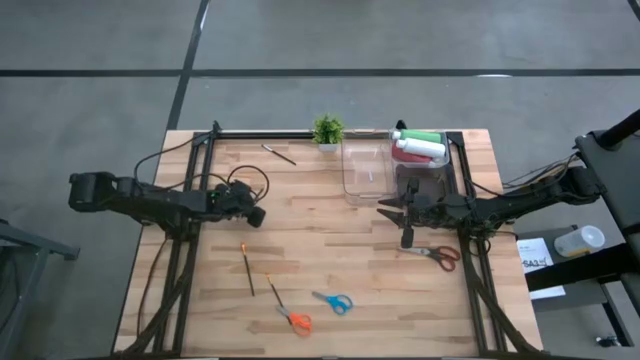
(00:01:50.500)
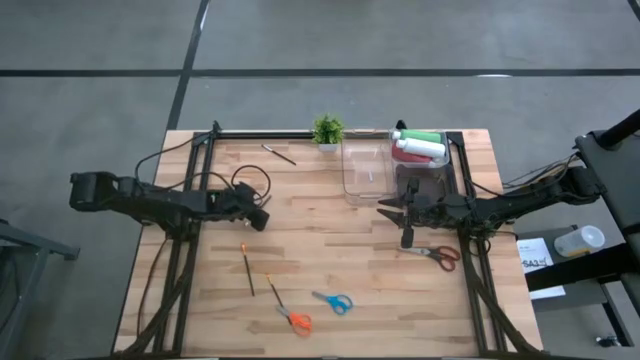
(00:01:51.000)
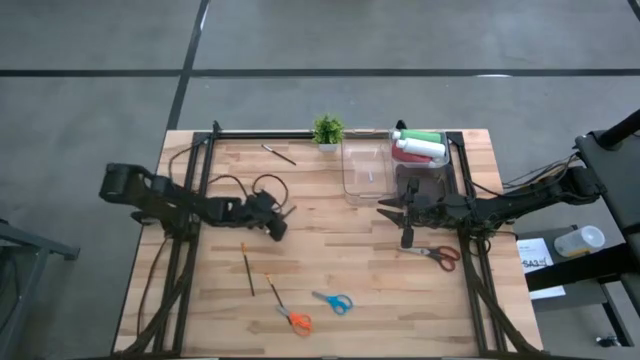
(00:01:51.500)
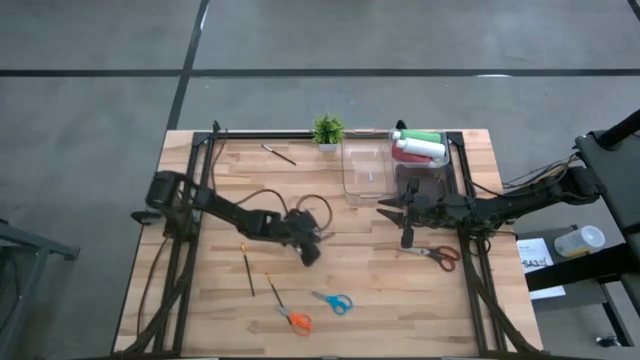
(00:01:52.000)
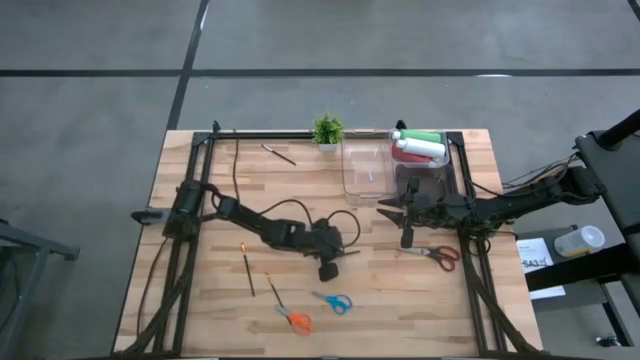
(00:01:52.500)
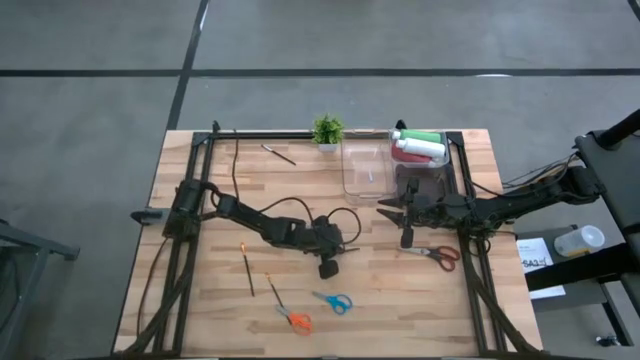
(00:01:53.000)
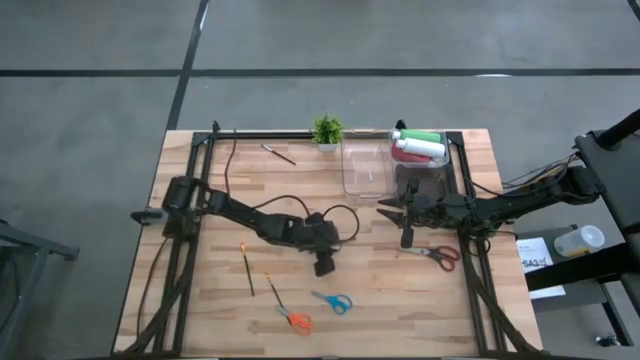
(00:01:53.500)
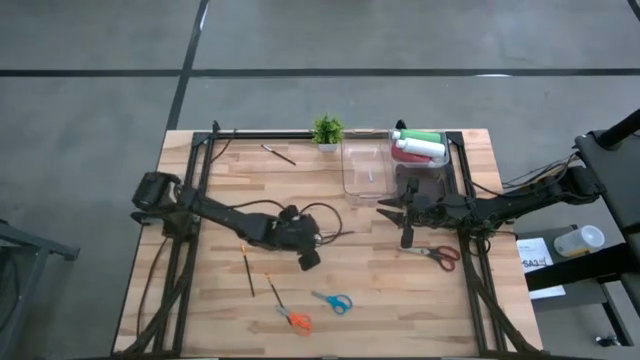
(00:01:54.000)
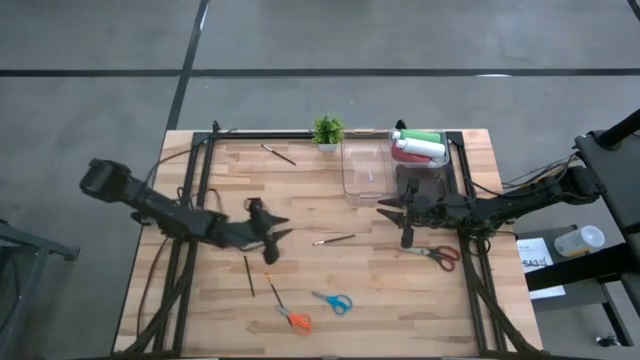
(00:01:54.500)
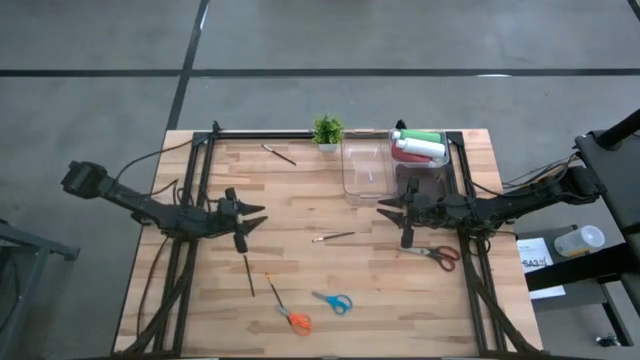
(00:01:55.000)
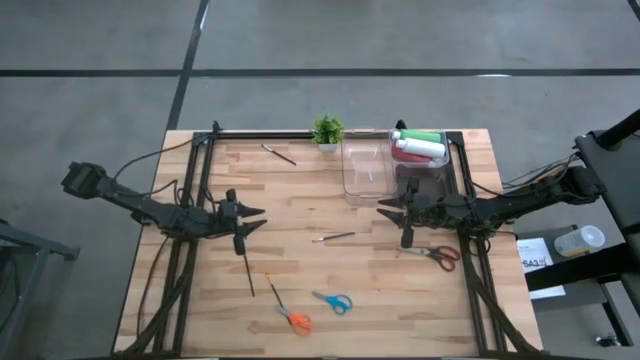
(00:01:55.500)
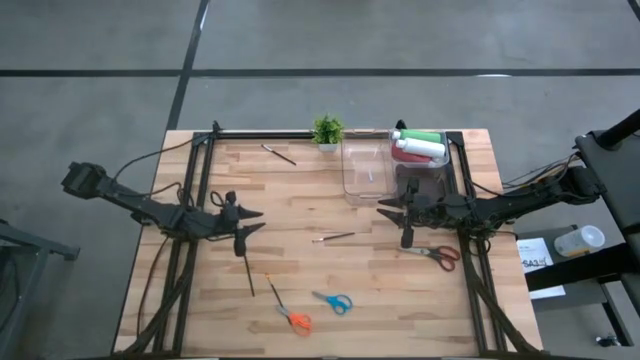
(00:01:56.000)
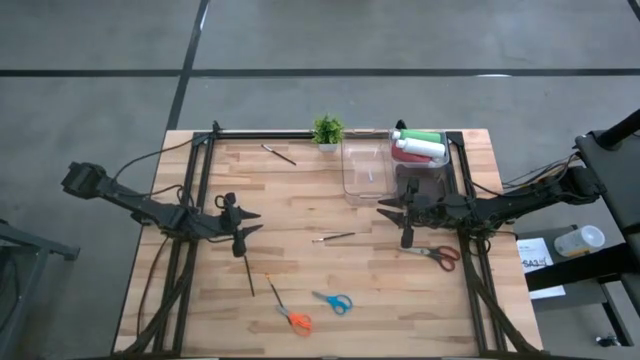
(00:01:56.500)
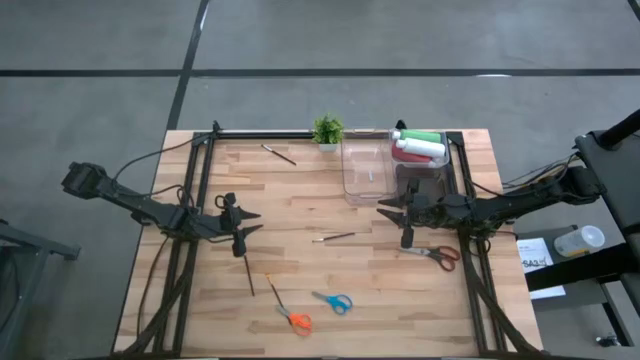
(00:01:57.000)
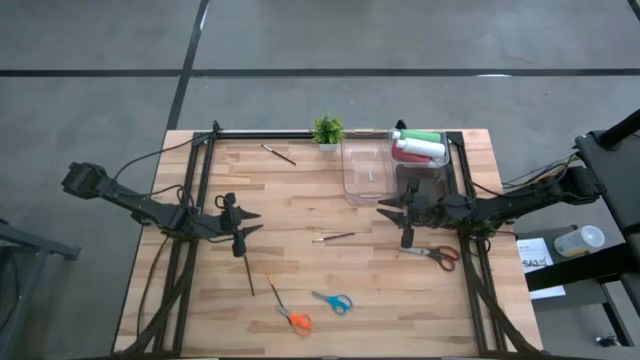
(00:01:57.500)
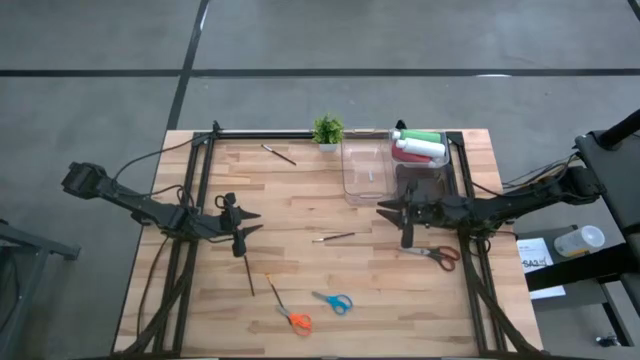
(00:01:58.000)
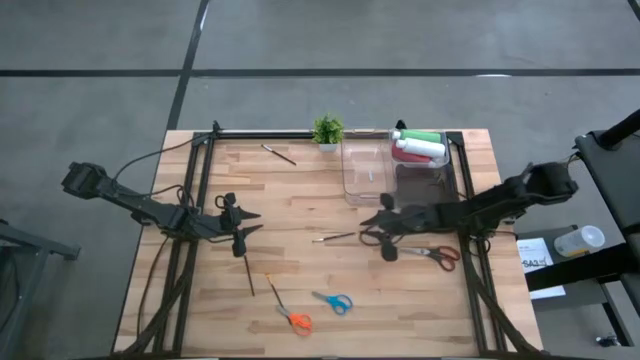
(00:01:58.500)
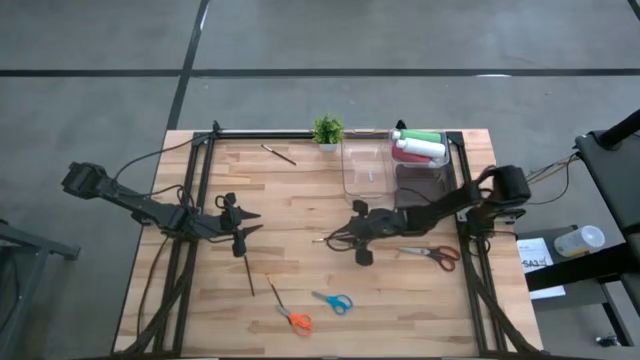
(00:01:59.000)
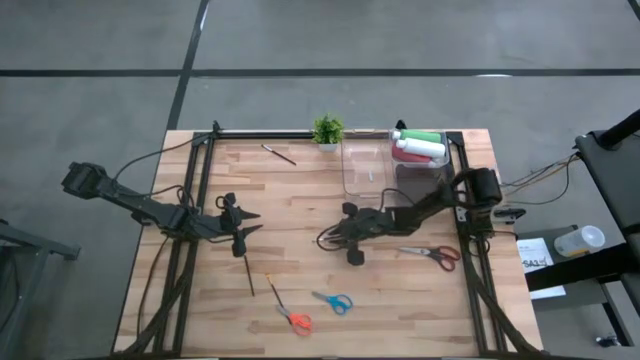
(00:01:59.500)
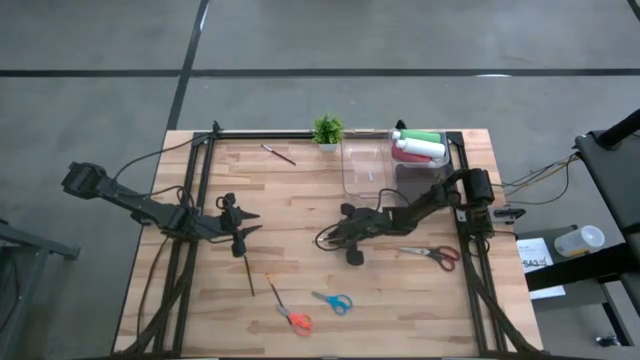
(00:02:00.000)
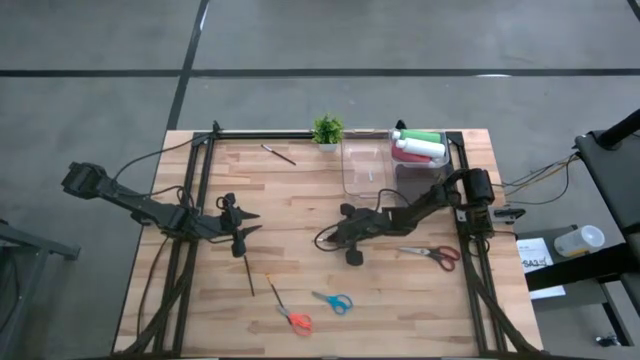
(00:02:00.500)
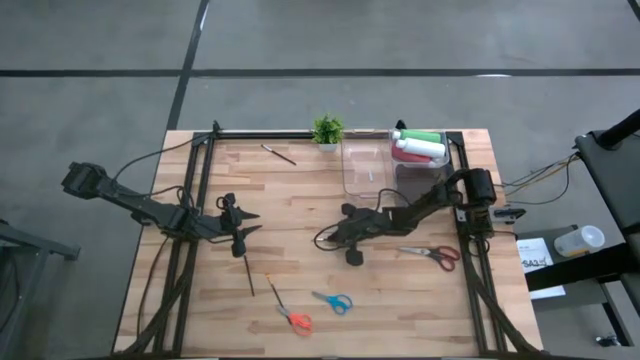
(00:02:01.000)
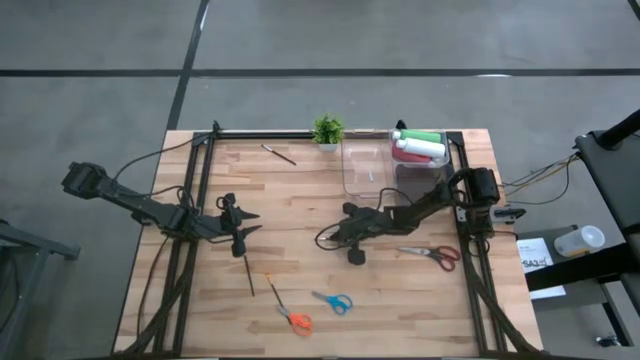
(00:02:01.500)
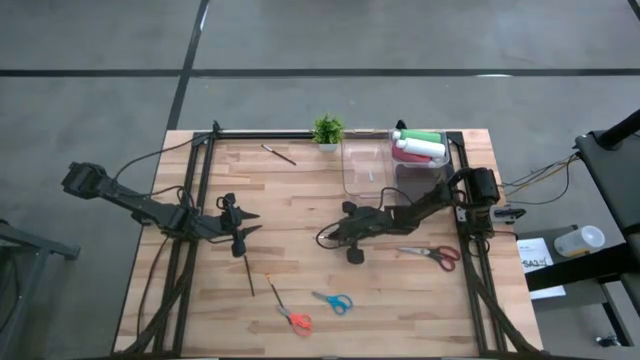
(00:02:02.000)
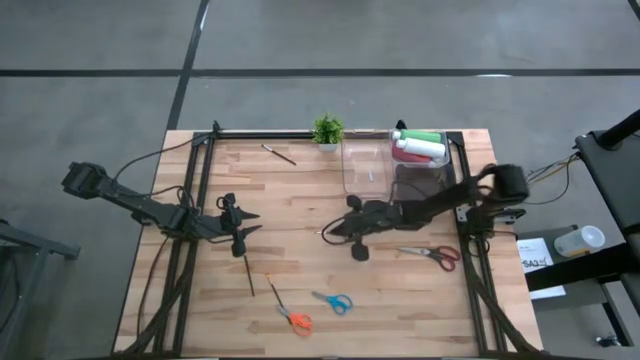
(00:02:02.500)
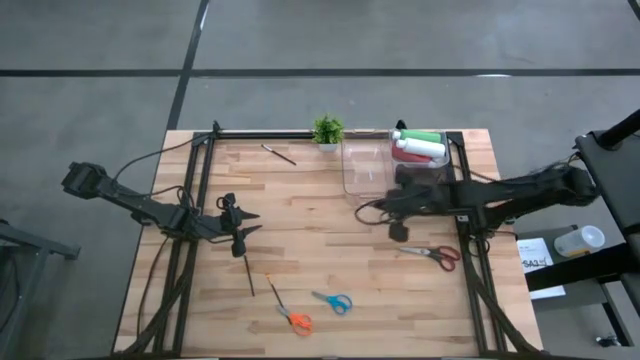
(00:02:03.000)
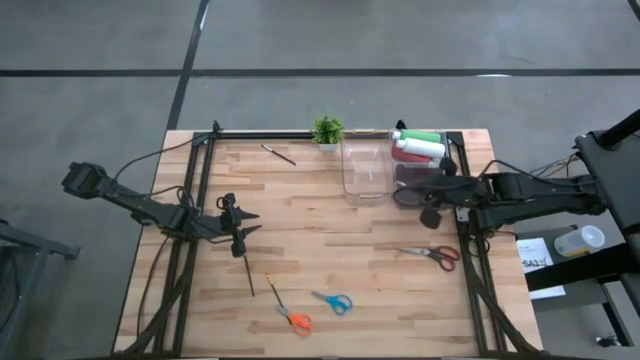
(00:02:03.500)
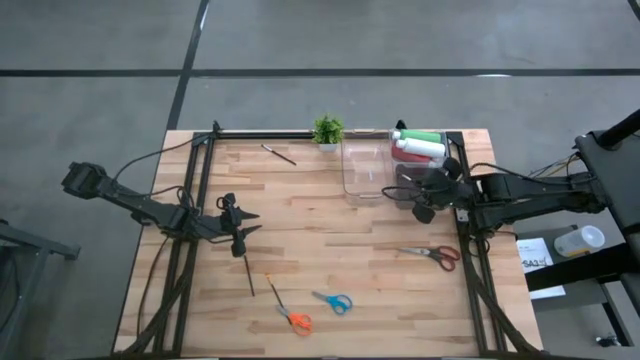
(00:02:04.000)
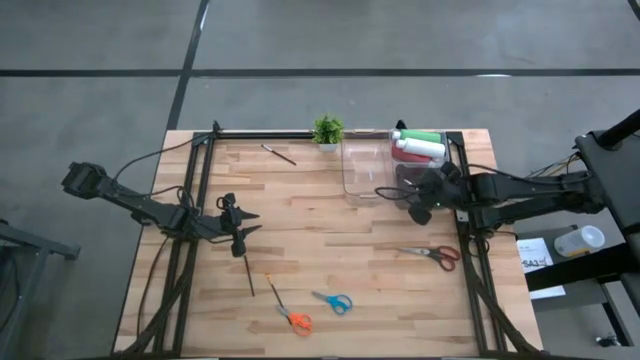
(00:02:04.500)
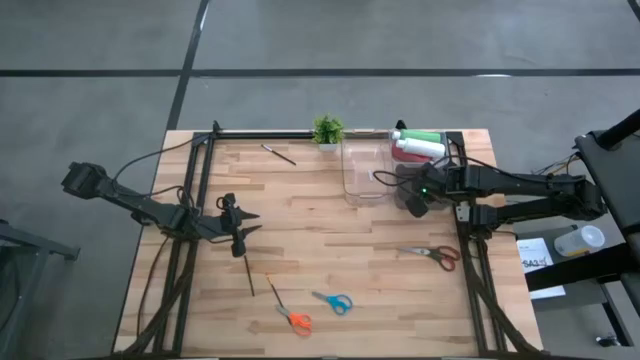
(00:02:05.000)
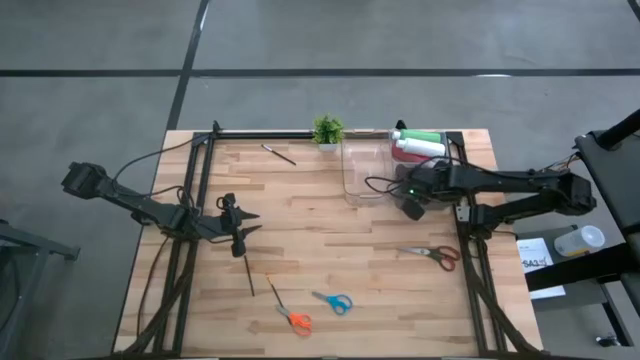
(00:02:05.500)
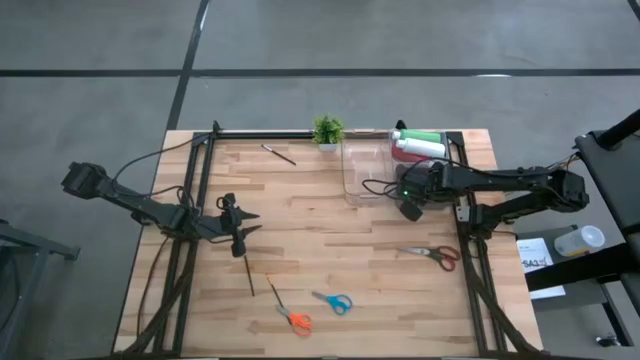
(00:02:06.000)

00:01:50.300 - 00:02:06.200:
Task: Pick & Place Paint Supplies
Put the bottom silver paintbrush into the black bin

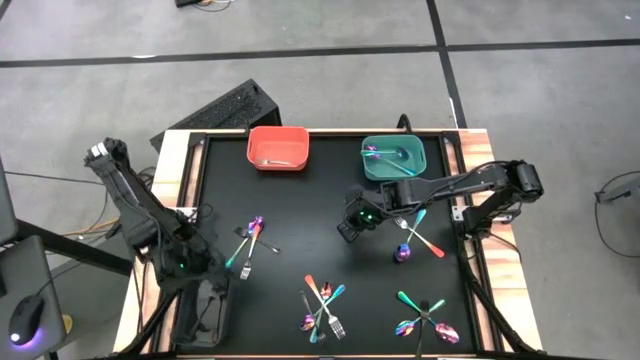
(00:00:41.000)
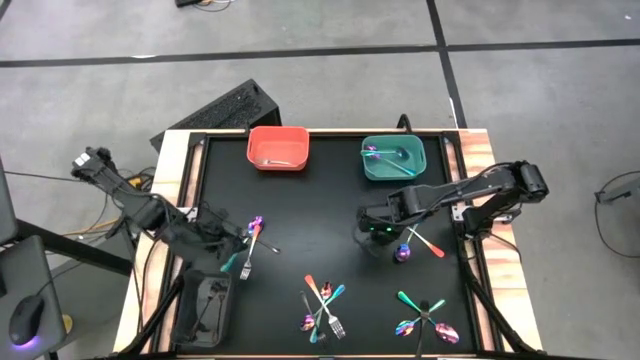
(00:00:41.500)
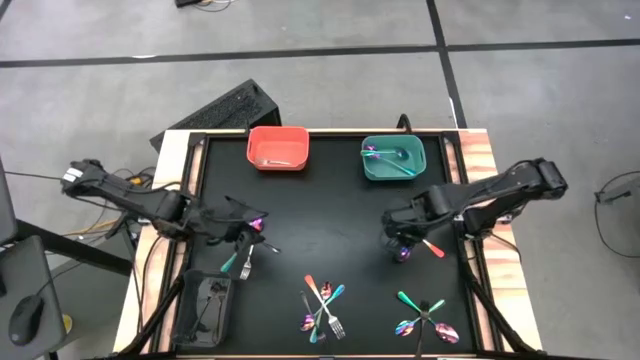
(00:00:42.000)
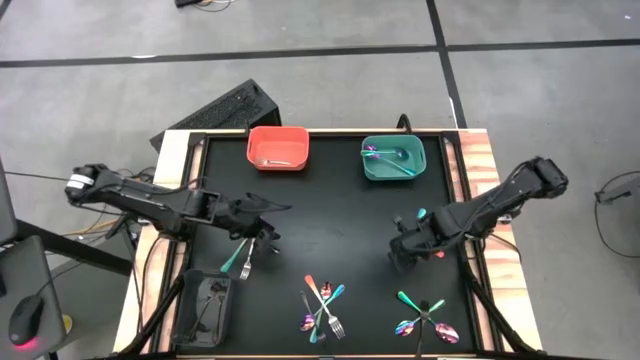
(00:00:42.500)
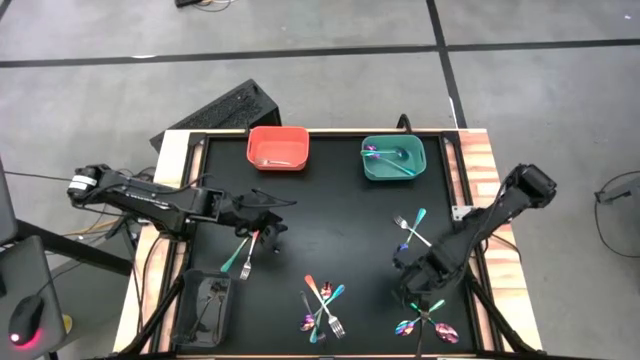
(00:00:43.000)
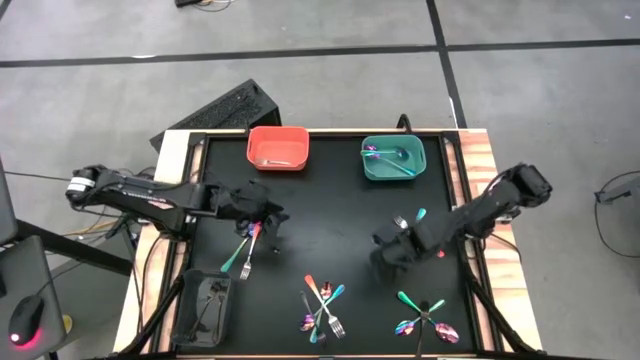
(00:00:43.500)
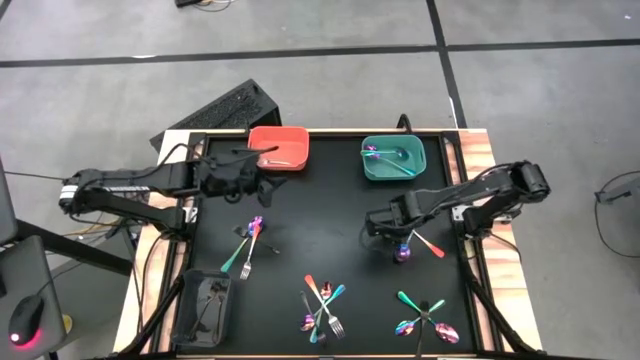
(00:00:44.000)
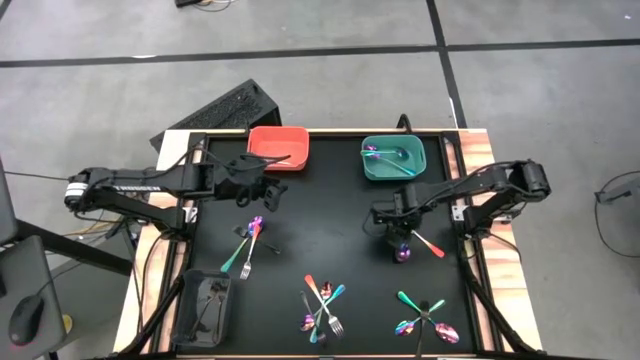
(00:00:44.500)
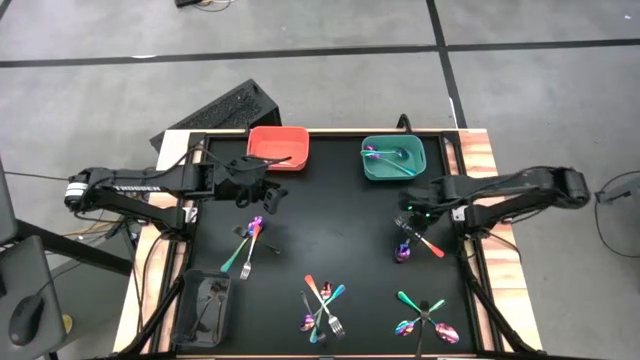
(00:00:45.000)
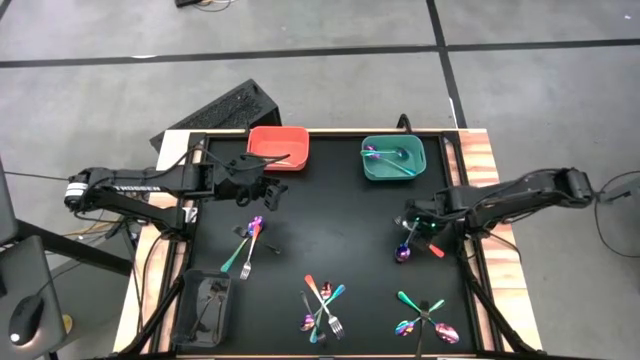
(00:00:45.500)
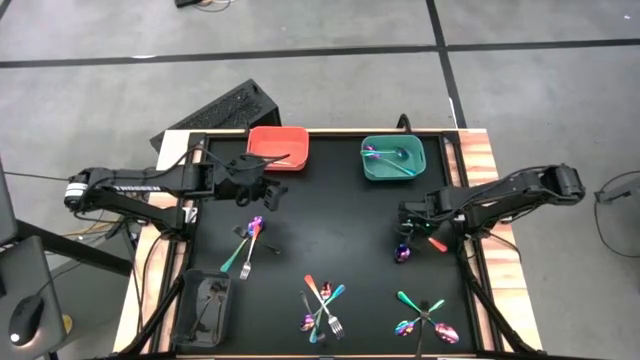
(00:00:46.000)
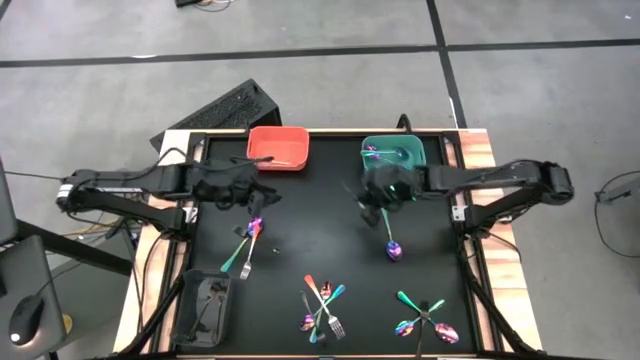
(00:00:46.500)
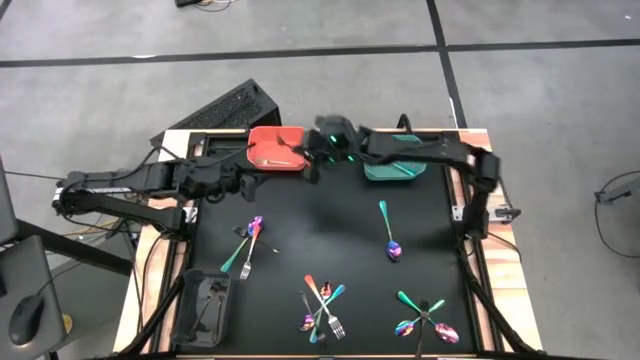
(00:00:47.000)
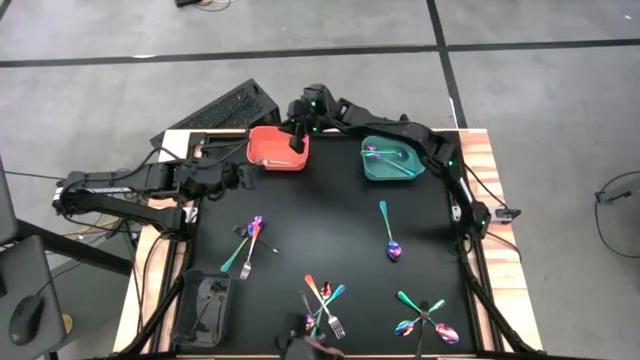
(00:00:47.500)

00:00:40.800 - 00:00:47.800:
Task: Sort silverware by color (type)
Put the orange fork into the orange bin
